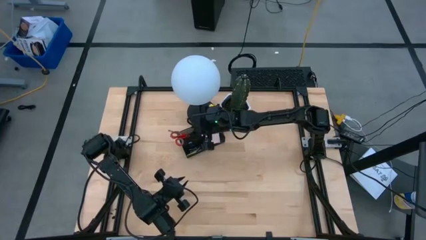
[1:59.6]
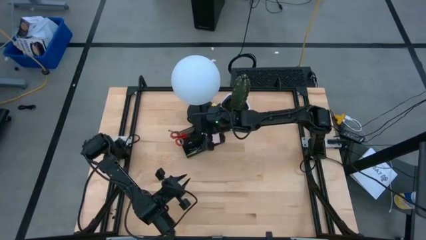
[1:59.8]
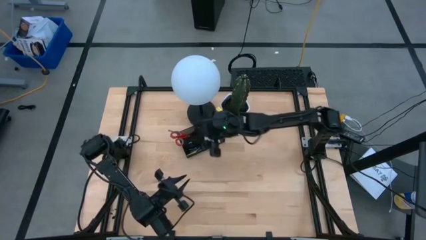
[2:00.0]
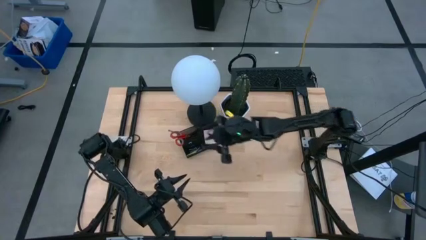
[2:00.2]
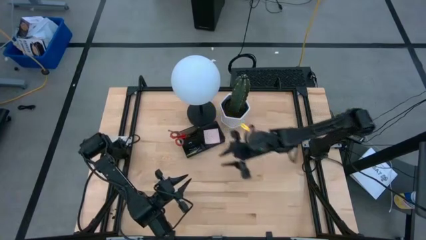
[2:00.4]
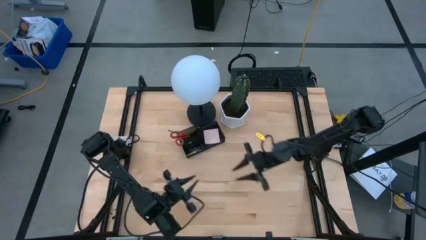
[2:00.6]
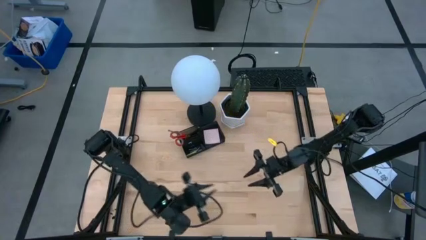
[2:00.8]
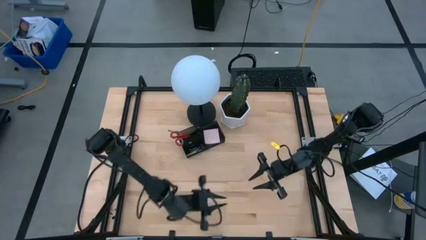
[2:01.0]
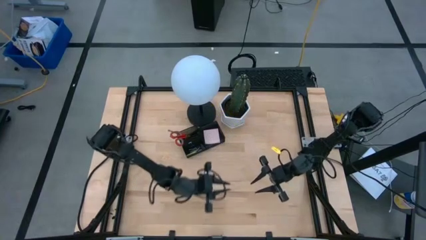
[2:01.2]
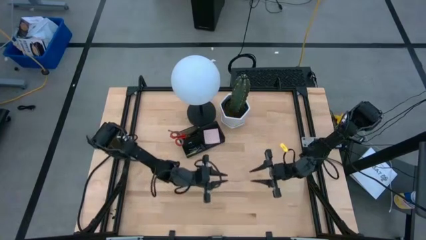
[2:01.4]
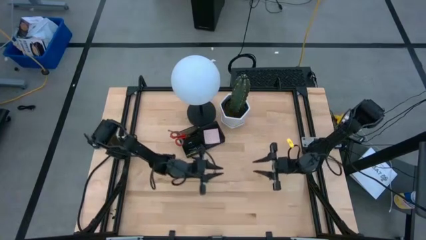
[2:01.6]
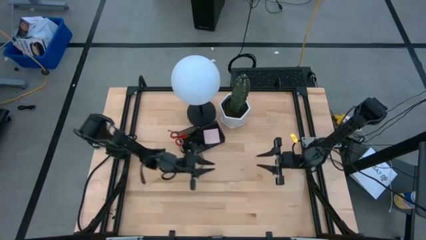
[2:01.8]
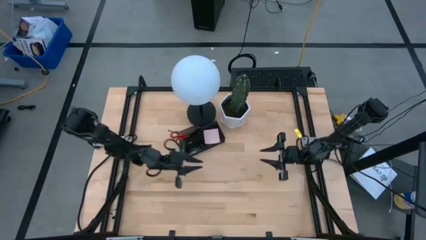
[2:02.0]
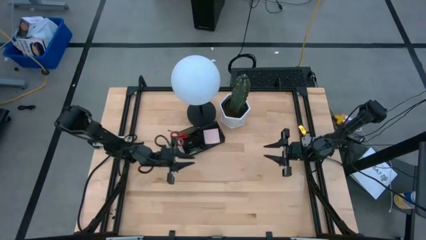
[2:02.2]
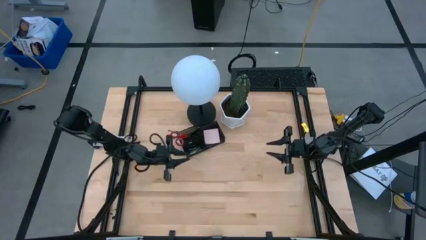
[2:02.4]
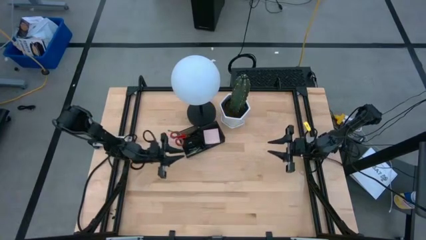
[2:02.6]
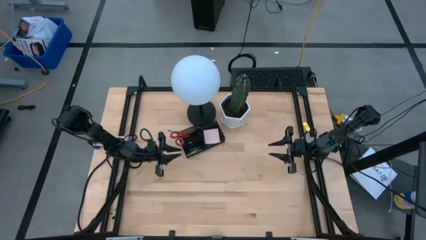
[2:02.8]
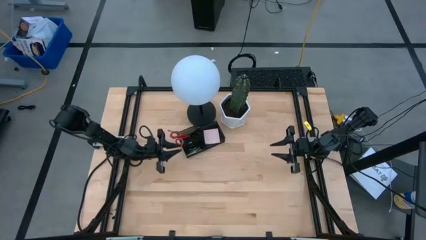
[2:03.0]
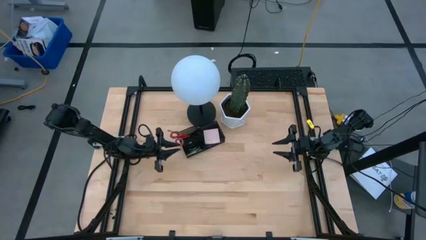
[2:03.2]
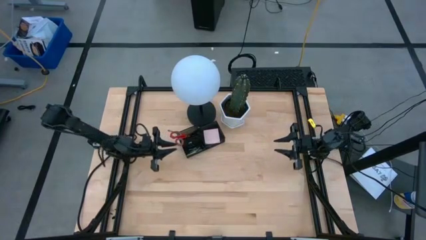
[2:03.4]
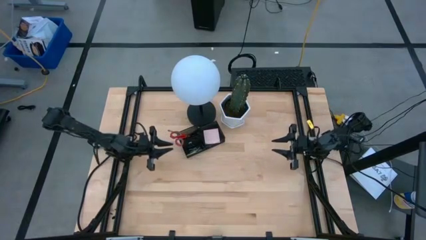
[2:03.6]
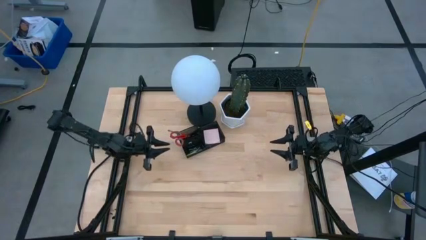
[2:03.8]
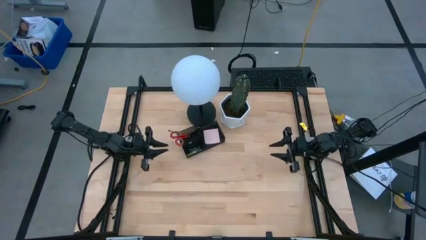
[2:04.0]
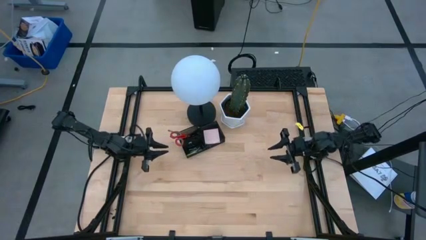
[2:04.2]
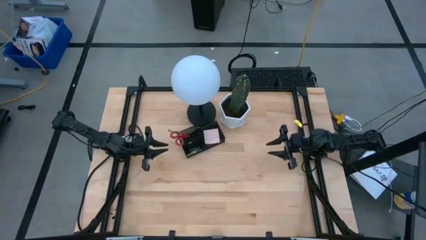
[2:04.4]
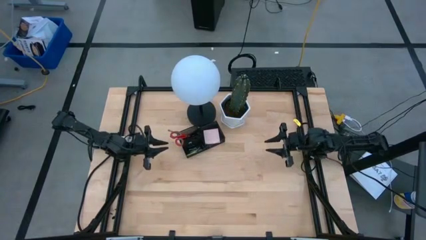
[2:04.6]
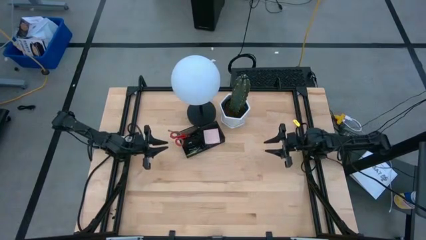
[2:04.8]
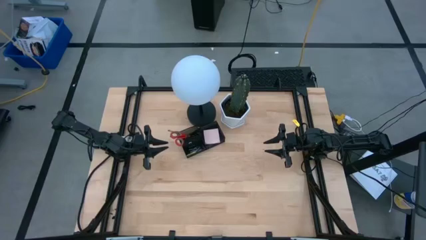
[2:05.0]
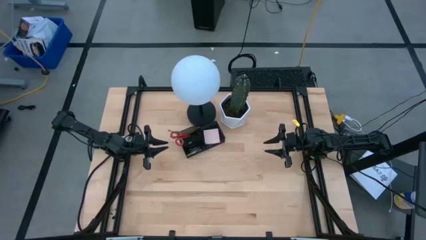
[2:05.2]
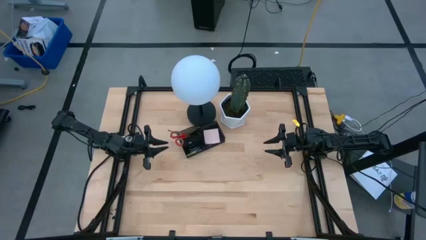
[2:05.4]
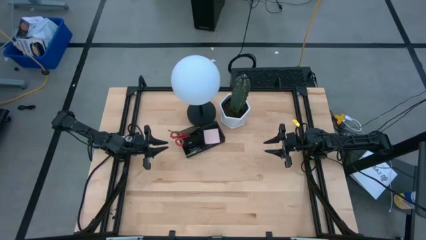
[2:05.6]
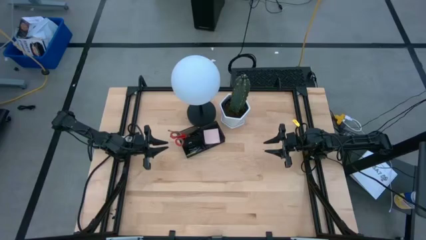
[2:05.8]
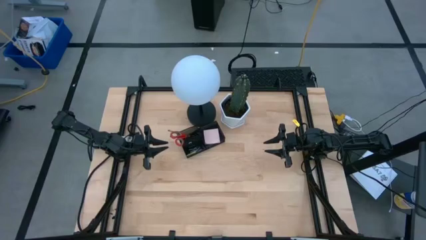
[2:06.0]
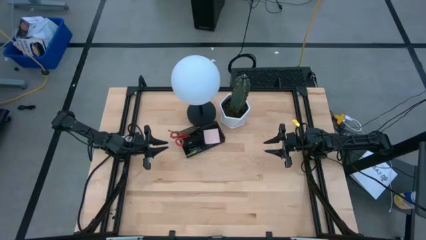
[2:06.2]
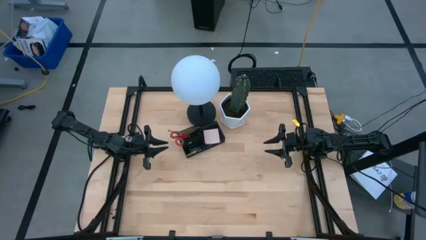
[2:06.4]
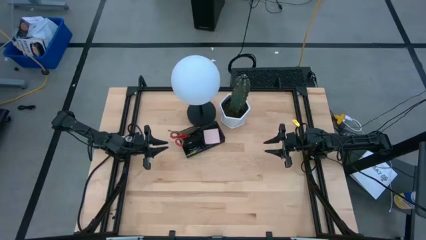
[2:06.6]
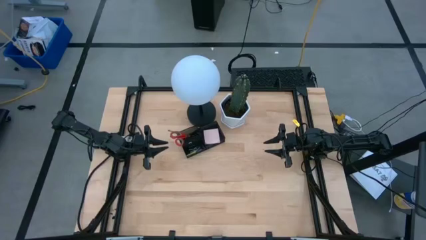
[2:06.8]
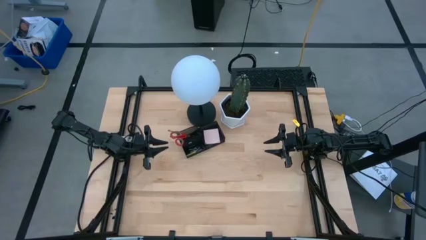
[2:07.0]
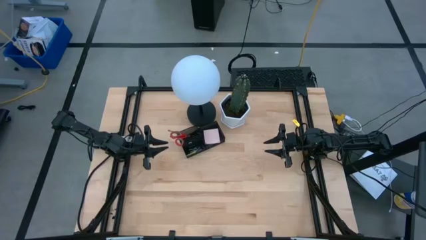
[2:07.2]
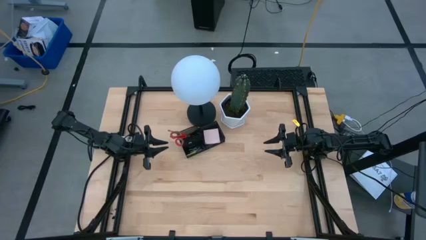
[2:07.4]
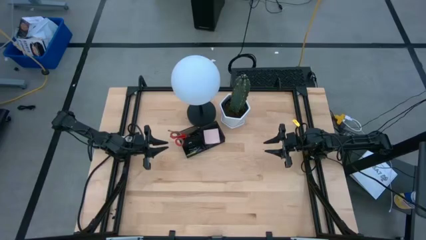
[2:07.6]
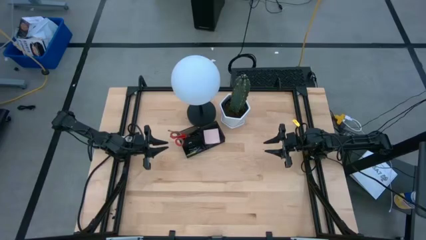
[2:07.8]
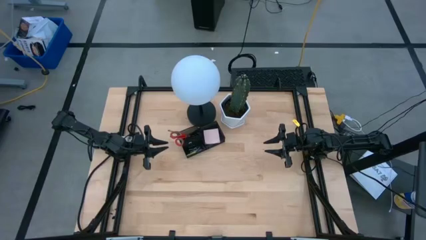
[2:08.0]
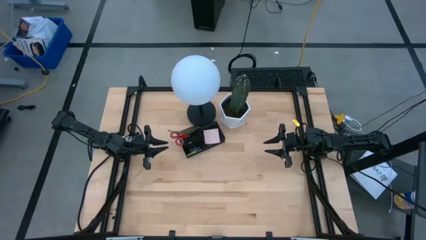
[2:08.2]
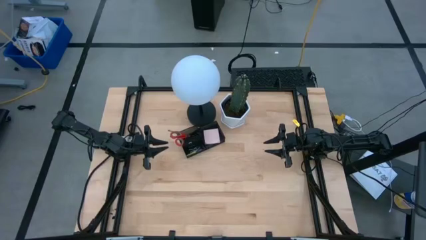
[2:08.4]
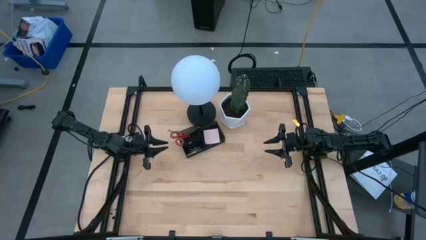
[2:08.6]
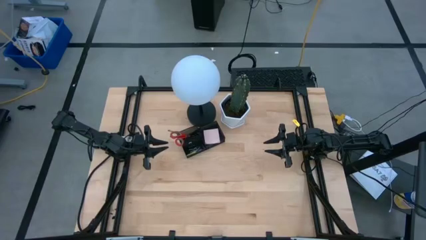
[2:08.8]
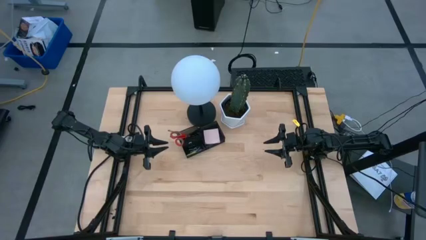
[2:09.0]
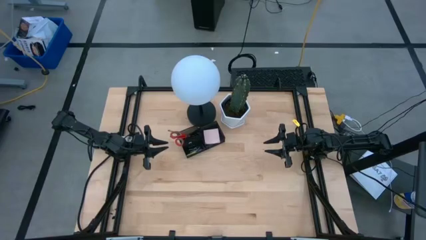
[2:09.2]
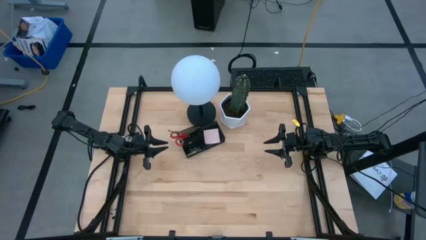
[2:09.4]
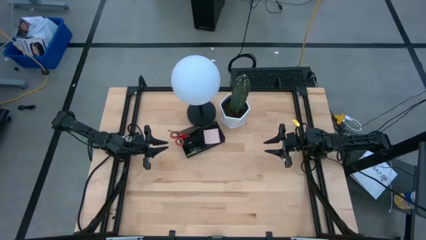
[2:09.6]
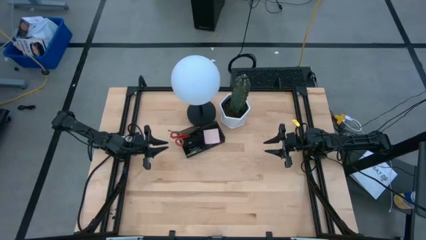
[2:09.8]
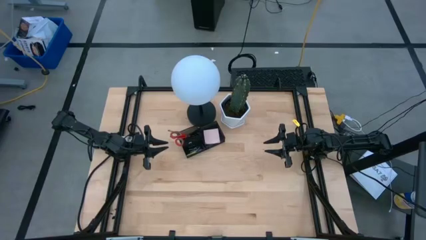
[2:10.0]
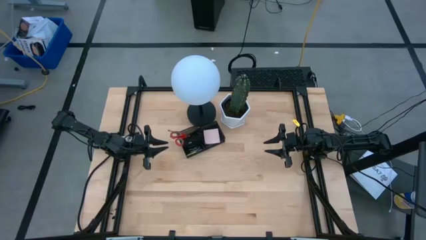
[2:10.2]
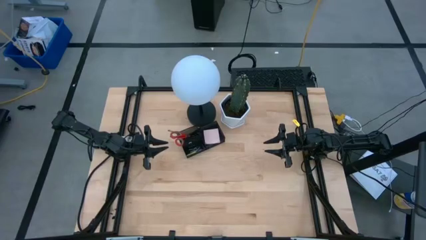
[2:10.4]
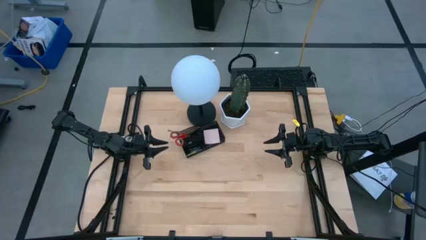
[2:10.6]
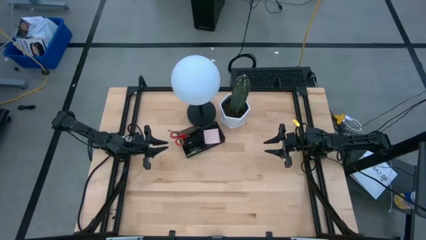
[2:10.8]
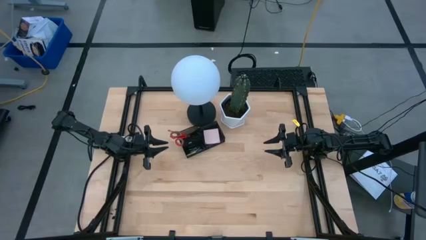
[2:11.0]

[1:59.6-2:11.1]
Task: Pick and place office supplies into organizer
Return to Home Position

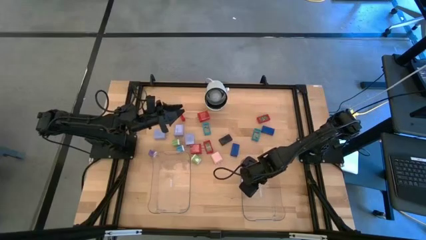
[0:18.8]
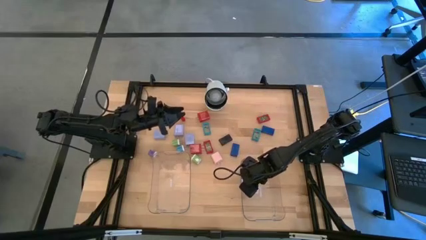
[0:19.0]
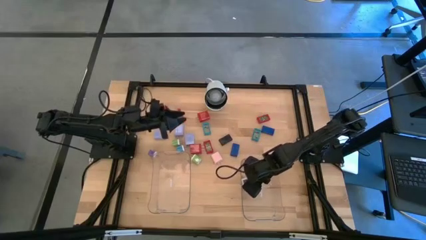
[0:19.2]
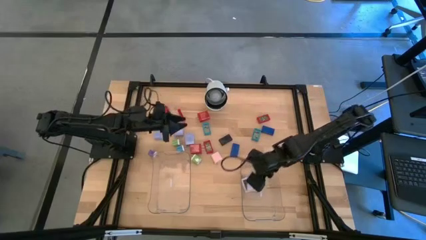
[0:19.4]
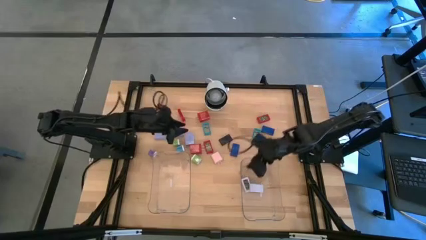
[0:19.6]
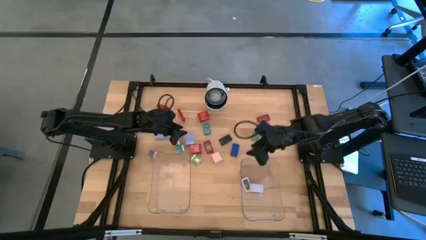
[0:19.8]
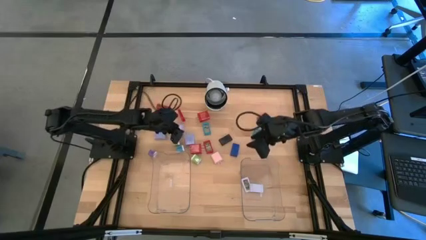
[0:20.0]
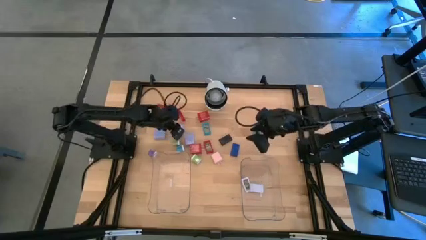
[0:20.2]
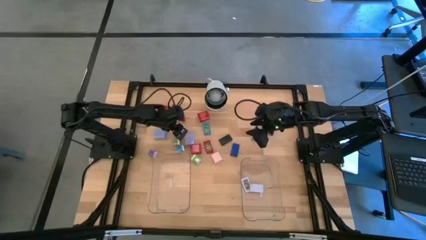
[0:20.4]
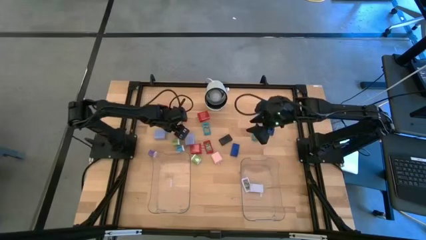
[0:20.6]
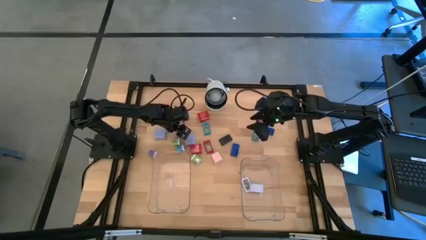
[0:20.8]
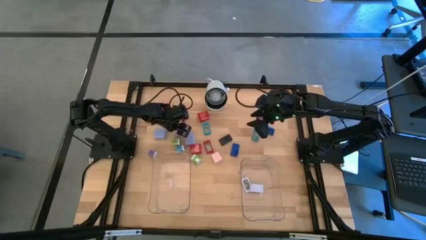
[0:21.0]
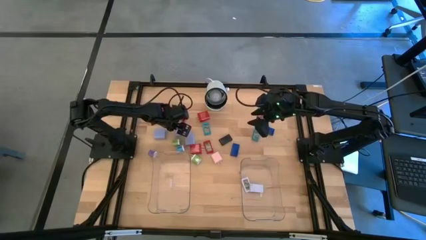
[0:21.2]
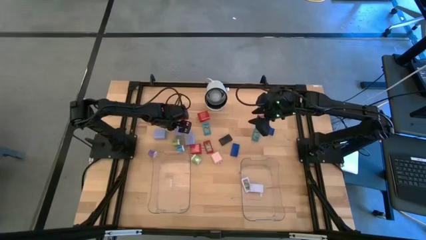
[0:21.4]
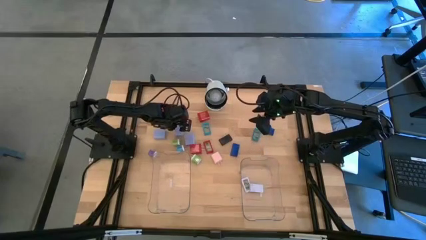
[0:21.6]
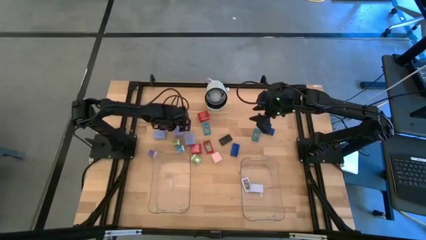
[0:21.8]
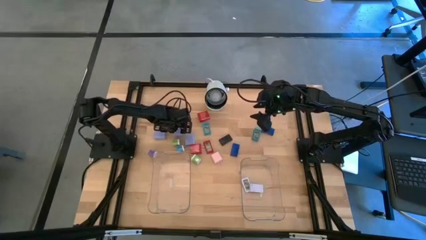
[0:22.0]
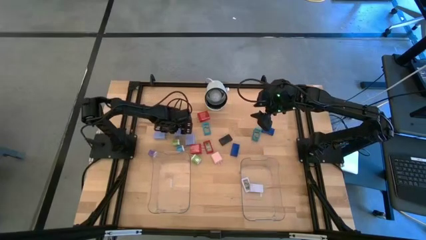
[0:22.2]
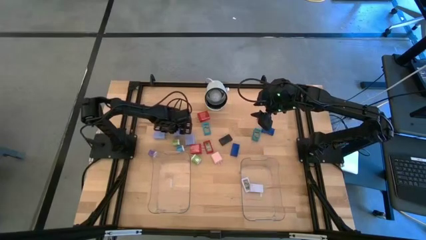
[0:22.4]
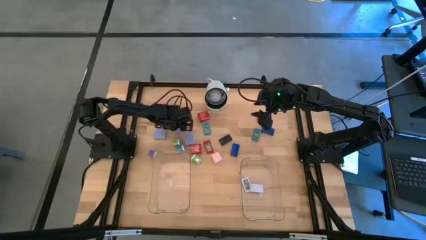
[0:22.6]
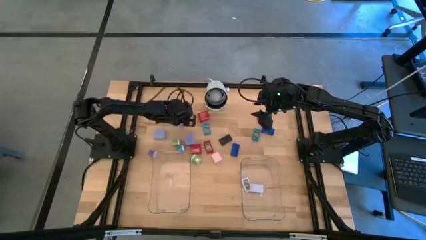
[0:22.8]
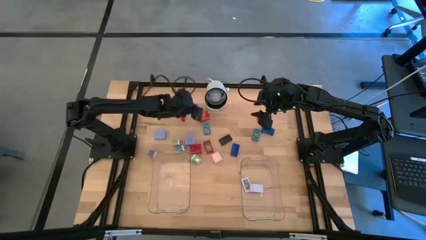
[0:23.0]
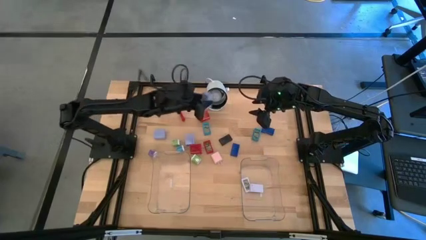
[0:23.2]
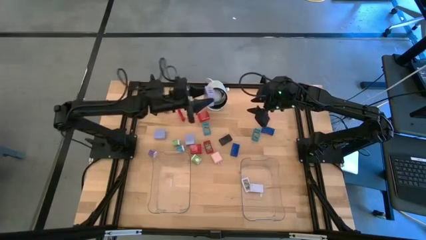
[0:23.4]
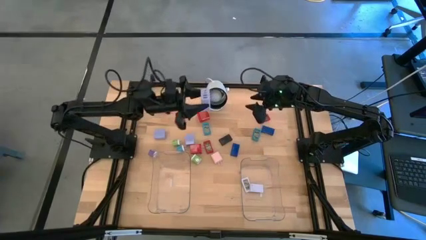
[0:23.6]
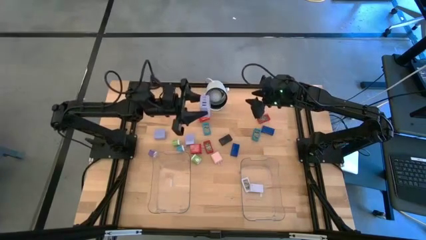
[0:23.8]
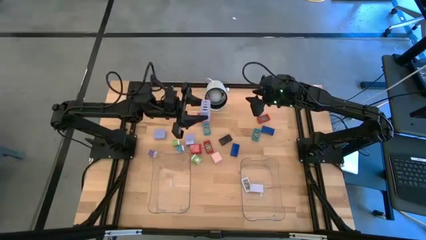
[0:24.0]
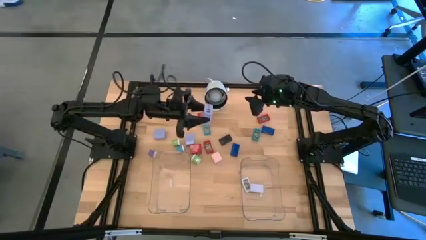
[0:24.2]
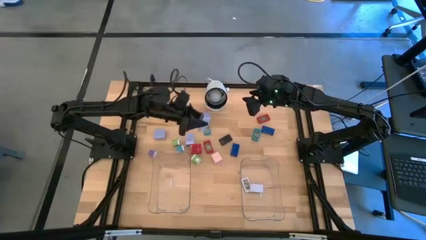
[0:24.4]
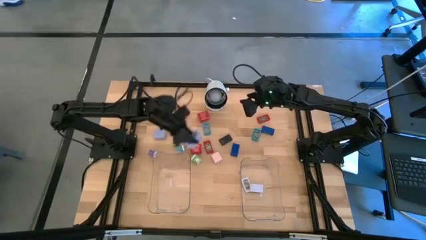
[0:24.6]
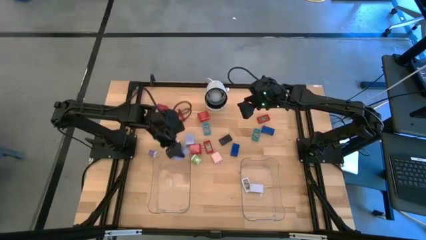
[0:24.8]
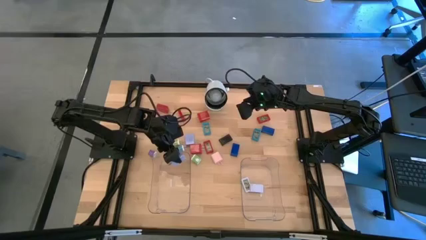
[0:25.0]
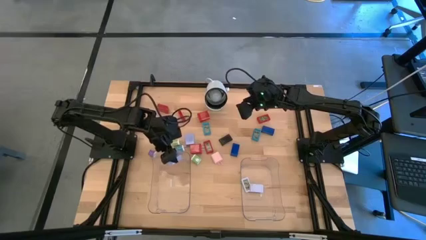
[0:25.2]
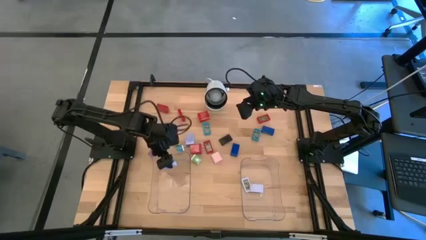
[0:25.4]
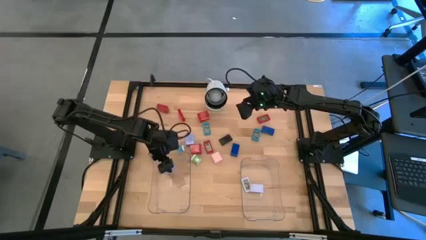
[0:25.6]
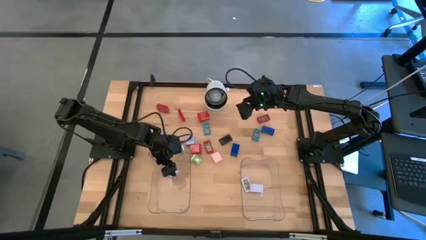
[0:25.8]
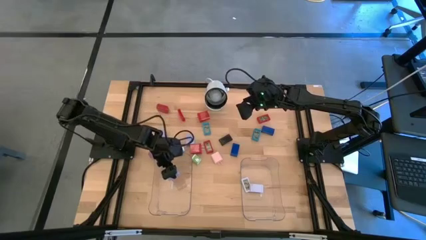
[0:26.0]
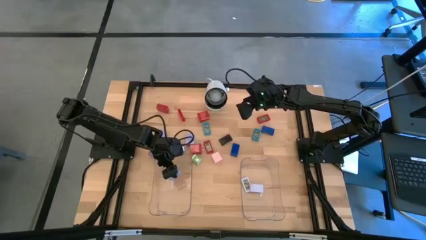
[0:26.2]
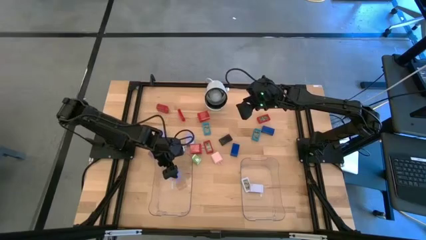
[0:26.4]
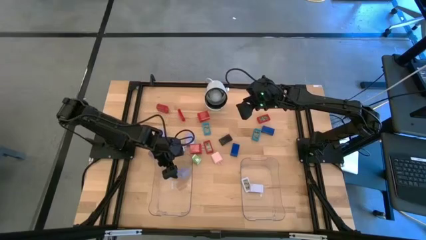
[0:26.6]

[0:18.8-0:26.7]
Task: Pick & Place Office items
Put the middle purple charger adapter into the left transparent bin
